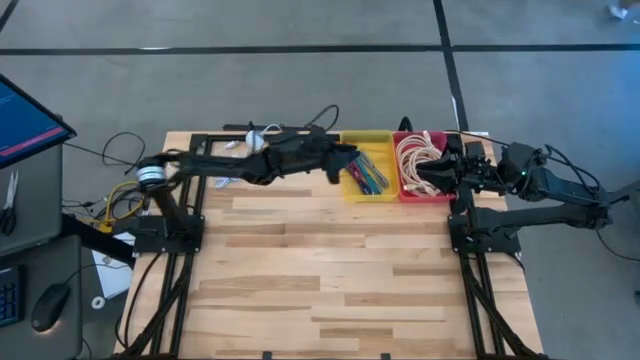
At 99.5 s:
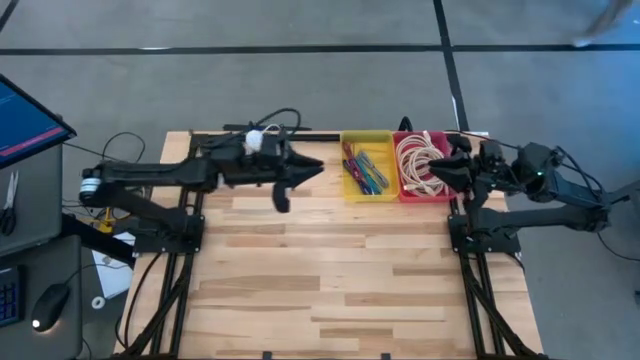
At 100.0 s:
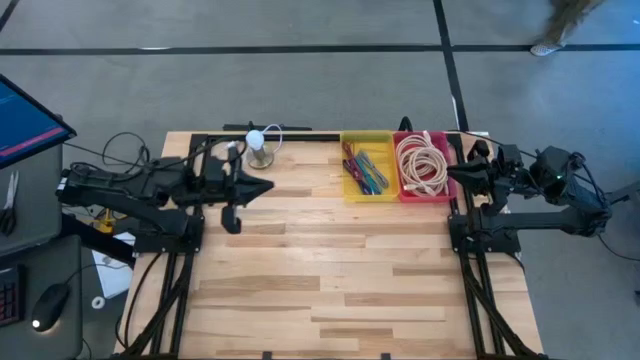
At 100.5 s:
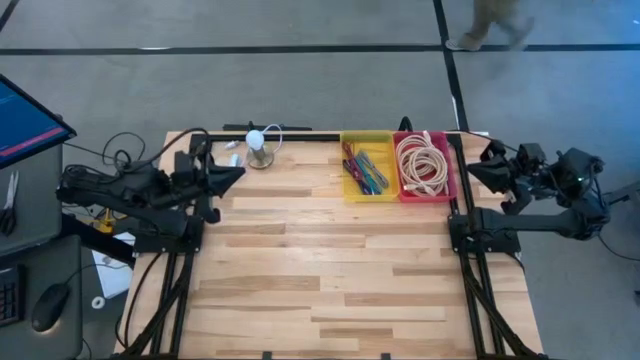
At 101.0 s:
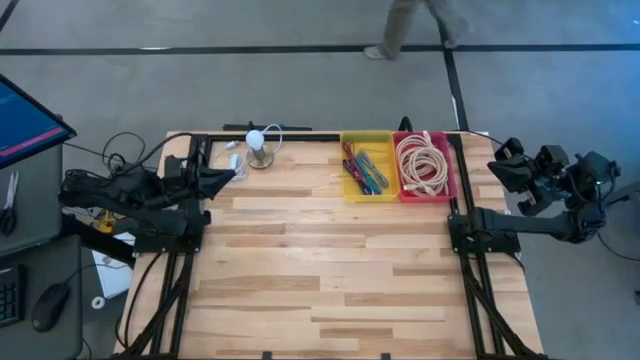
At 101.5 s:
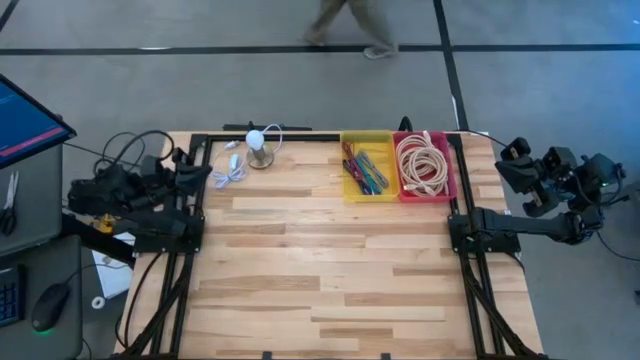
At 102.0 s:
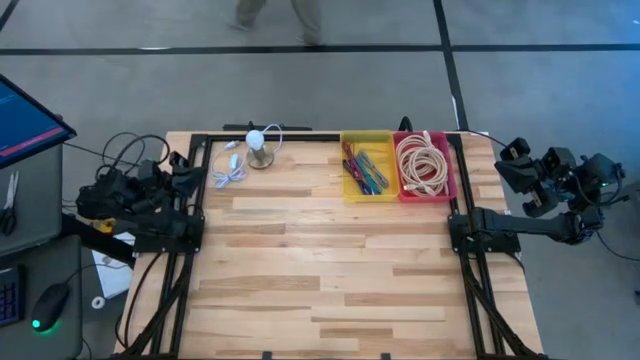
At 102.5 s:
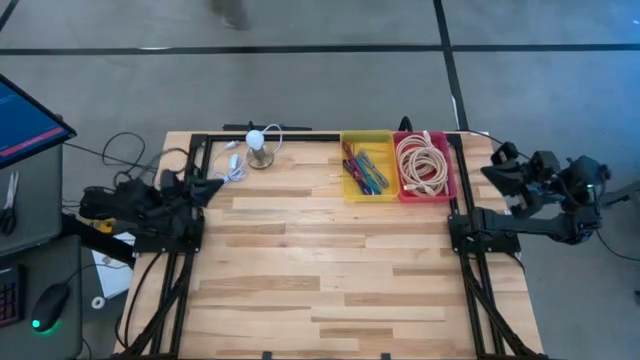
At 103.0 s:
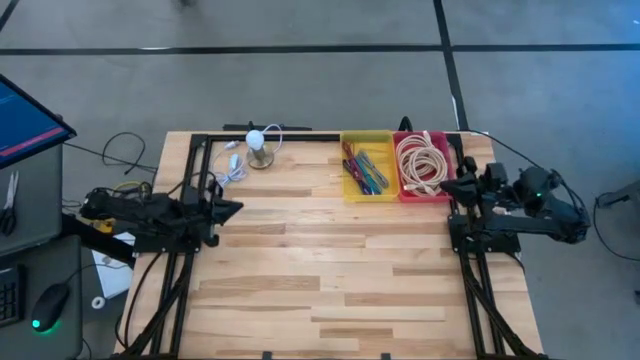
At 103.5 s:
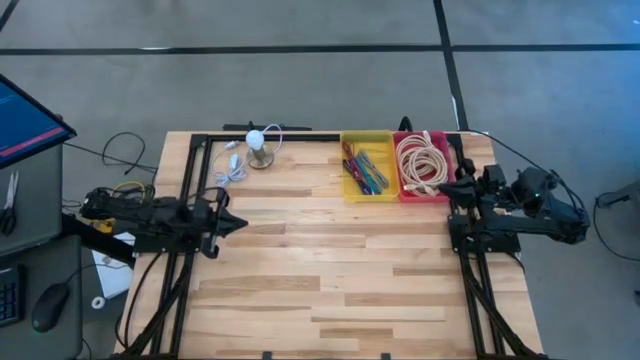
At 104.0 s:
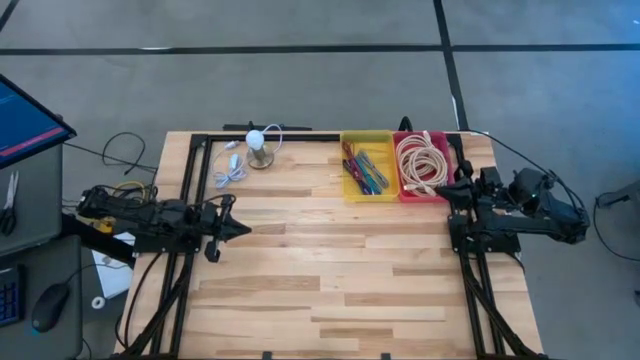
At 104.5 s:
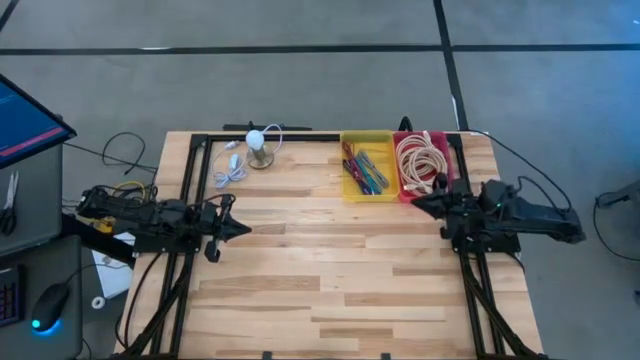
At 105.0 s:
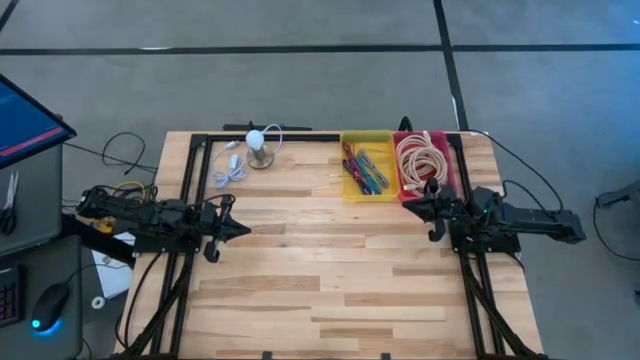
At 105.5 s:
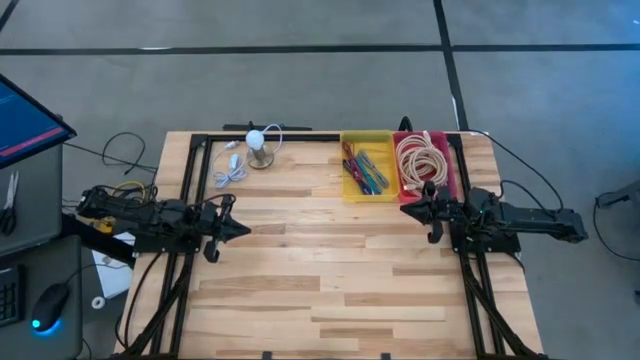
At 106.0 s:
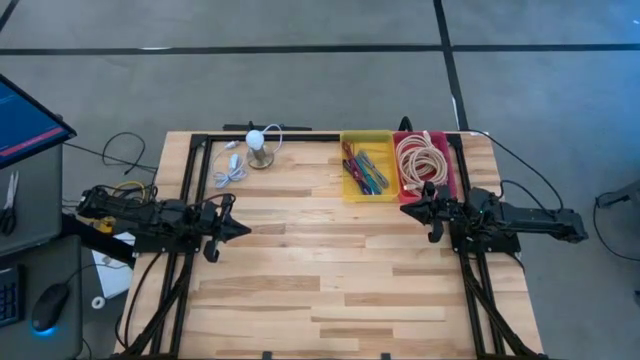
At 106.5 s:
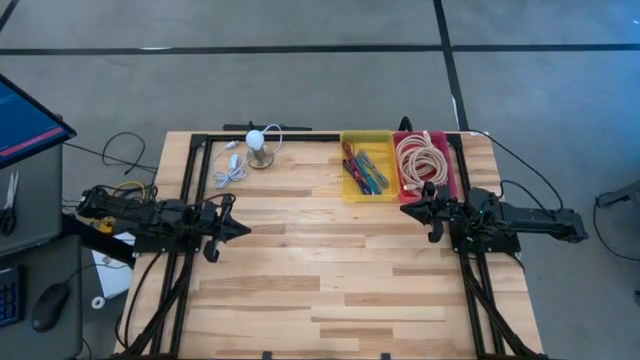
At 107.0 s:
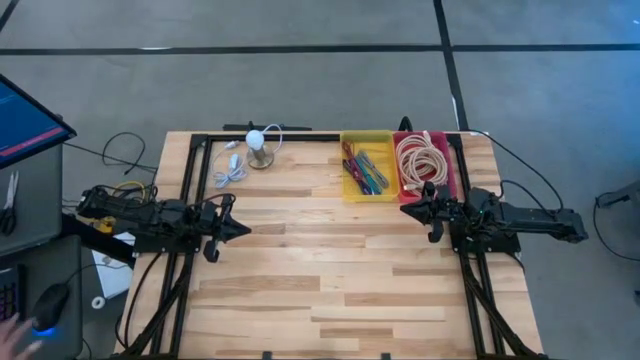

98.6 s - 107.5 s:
Task: Pick & Place USB Port
Return to Home Position

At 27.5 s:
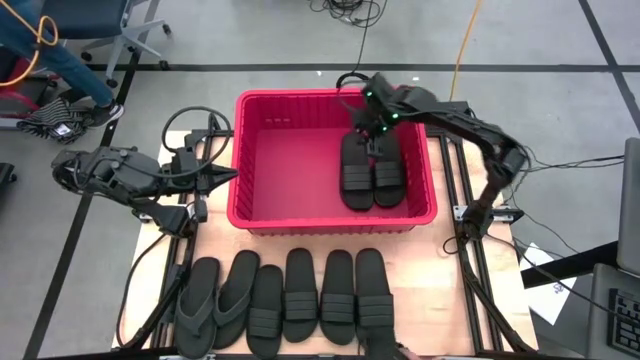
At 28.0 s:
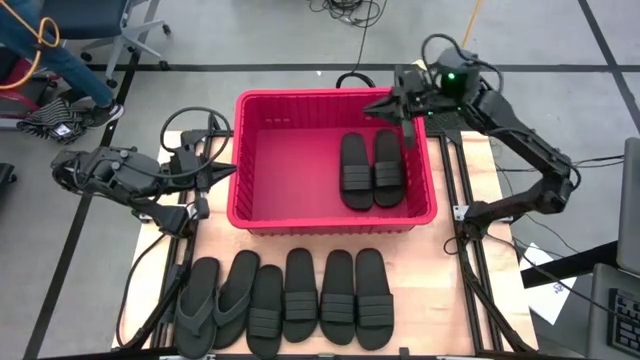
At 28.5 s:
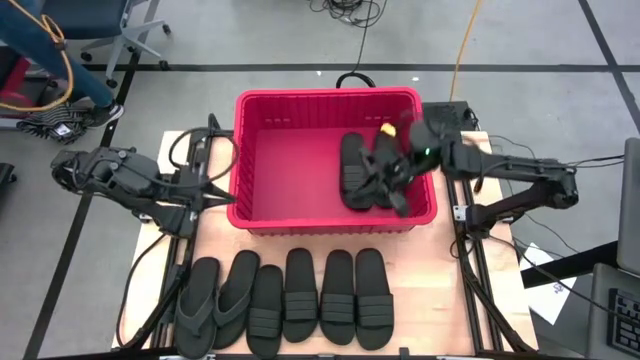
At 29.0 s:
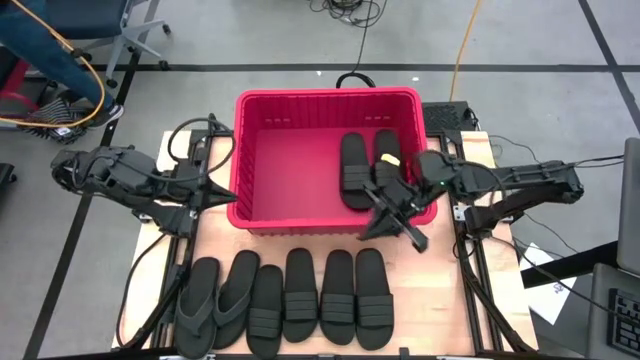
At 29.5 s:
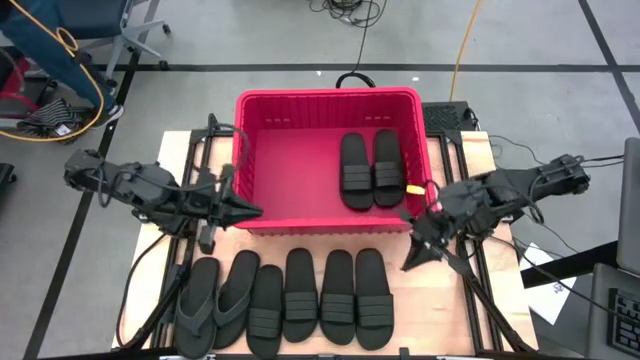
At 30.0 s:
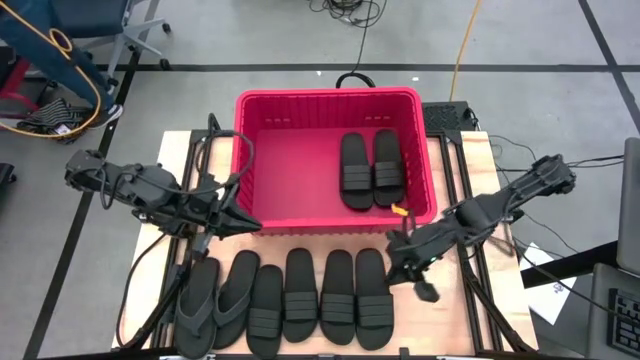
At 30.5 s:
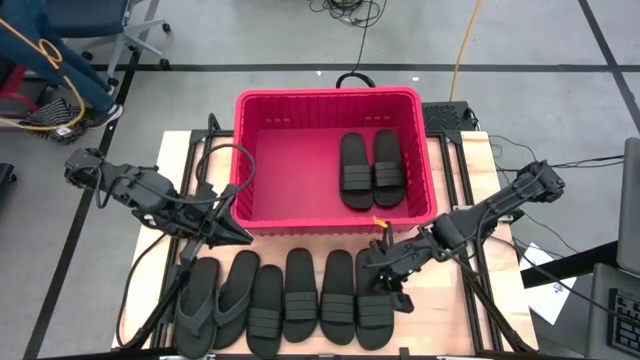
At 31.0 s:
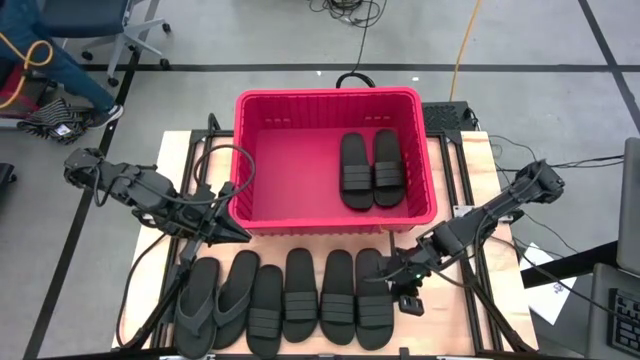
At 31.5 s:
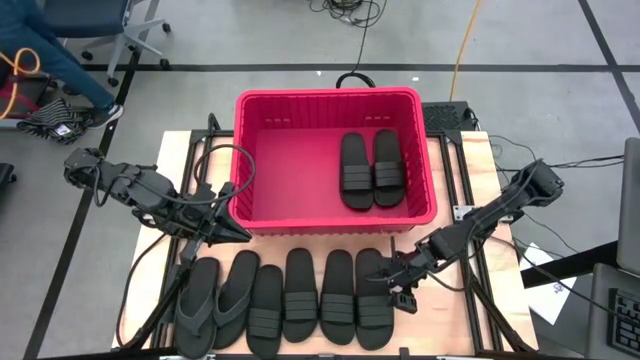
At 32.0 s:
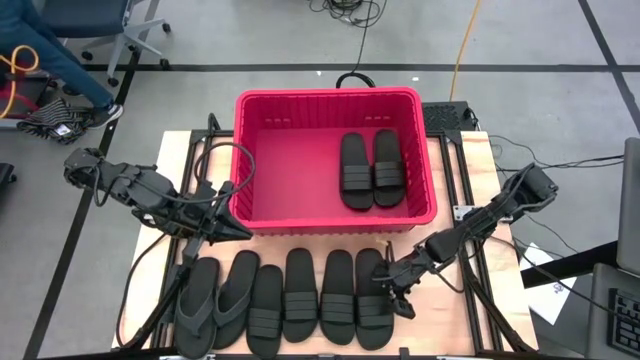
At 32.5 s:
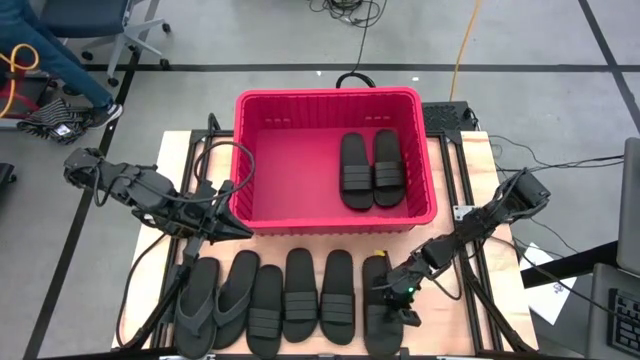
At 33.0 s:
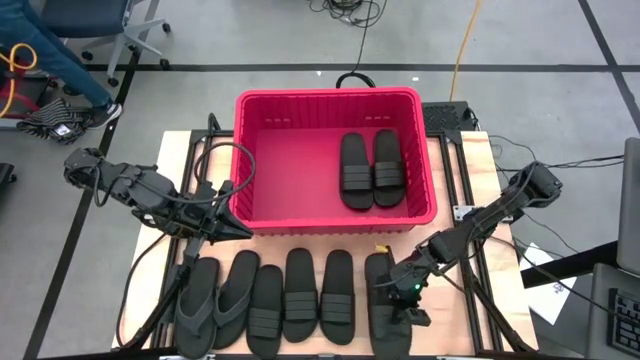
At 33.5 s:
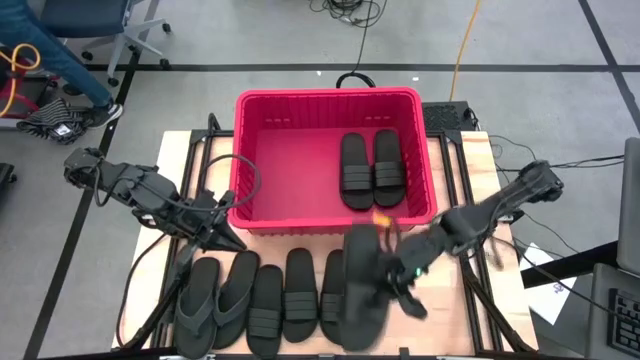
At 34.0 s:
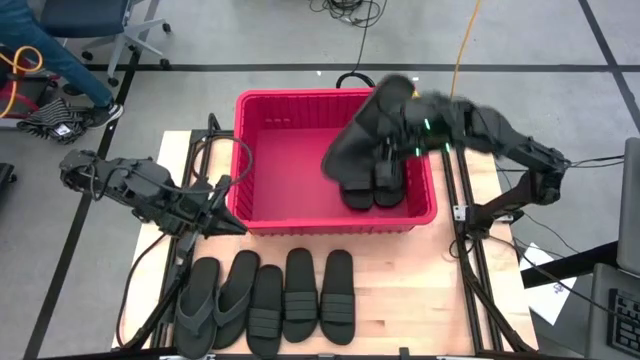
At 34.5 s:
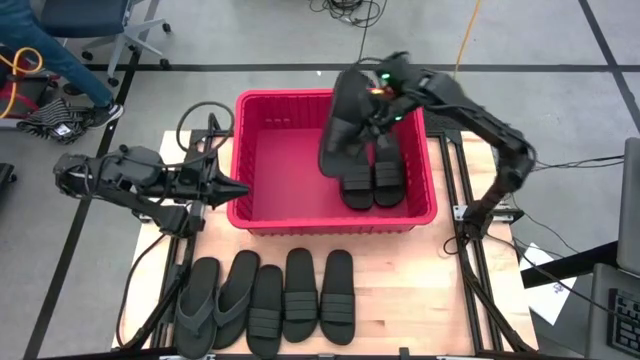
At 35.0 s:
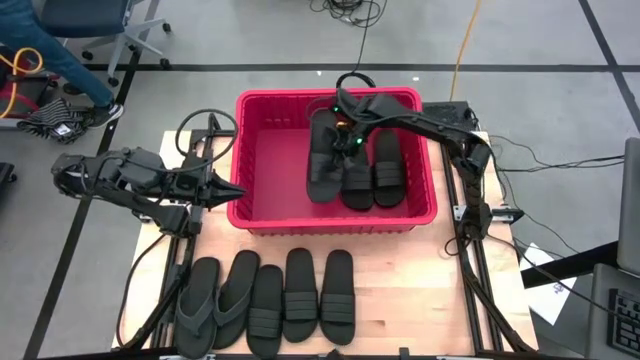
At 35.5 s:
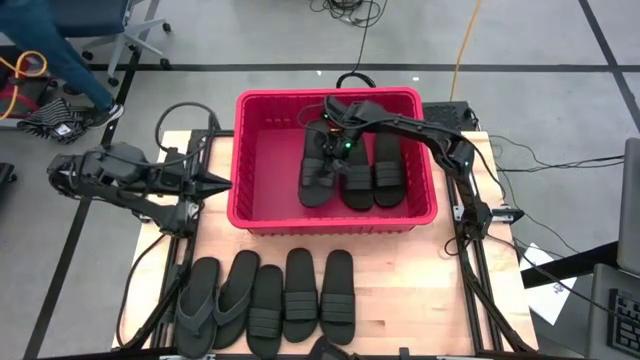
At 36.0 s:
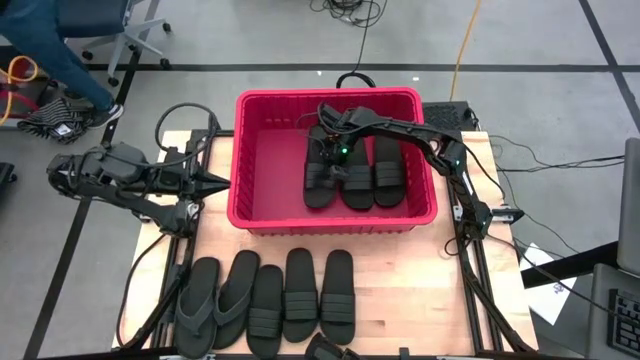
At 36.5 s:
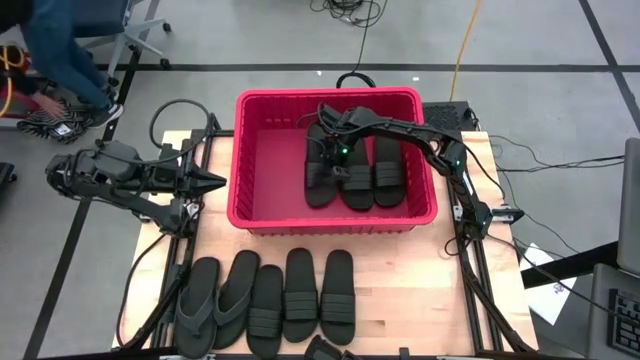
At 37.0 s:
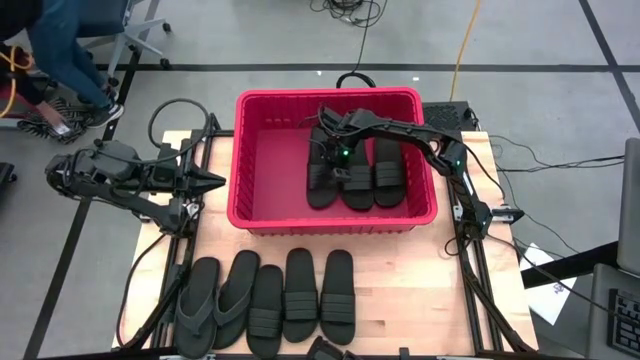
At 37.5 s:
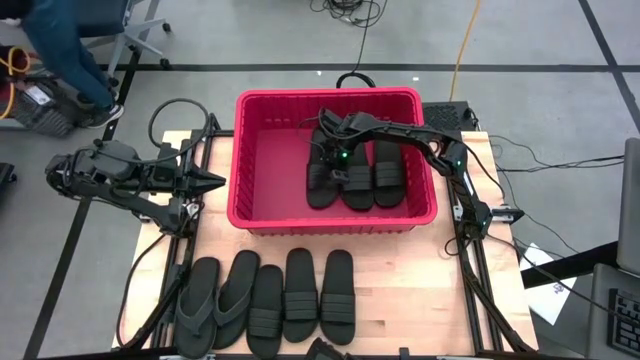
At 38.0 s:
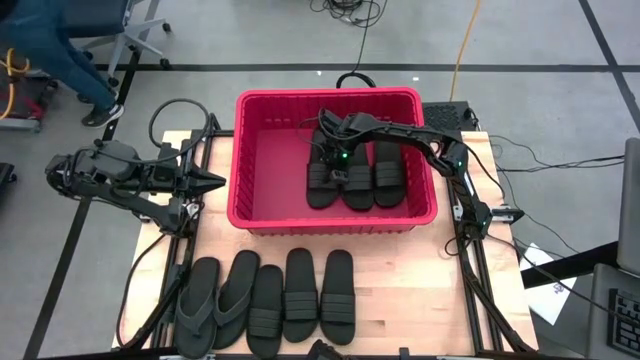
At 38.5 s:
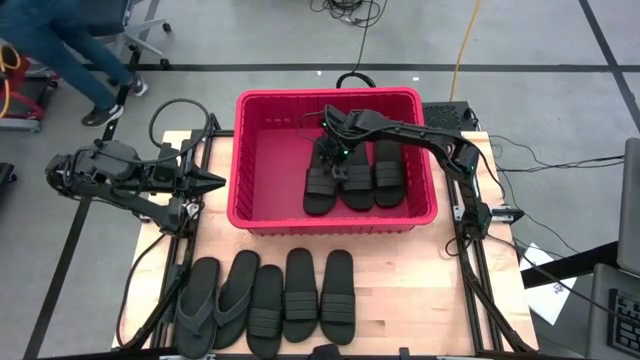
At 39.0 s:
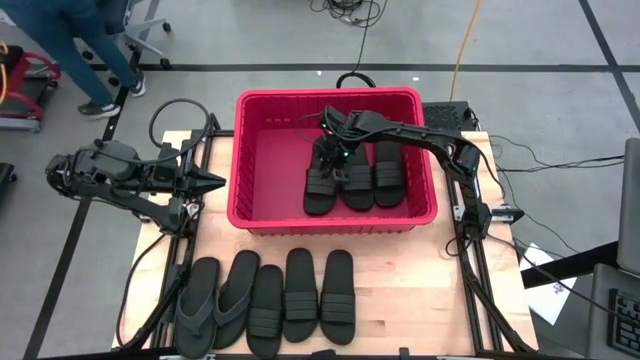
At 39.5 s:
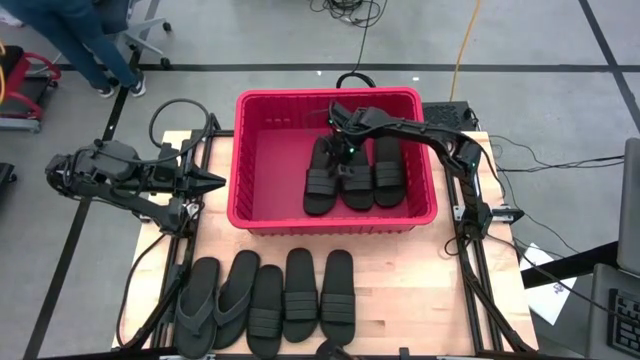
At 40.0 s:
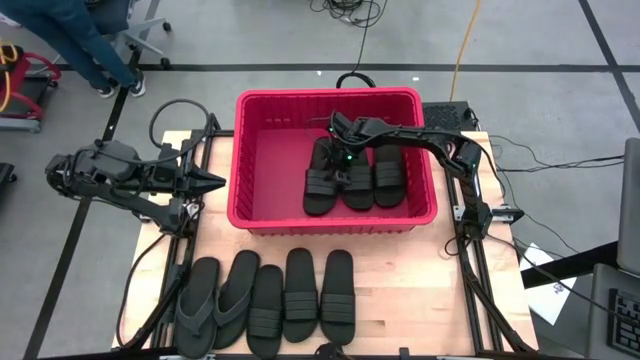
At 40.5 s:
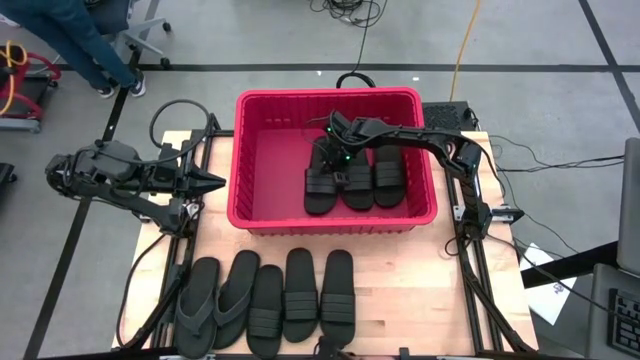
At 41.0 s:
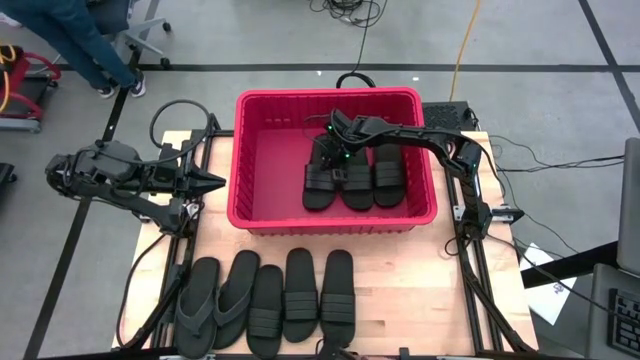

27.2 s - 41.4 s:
Task: Pick and place slides into bin
Put the black slide into the red bin
